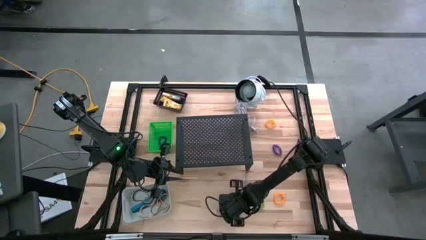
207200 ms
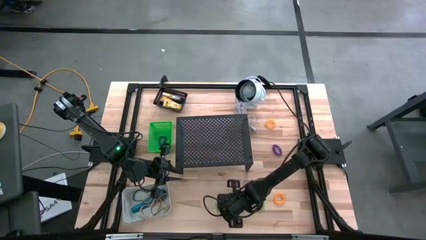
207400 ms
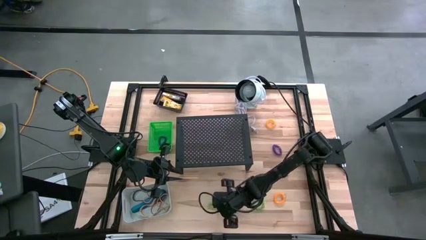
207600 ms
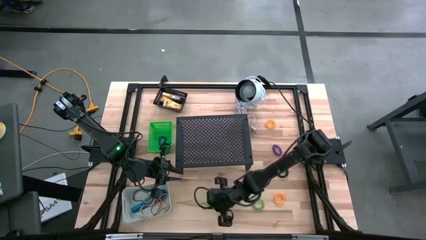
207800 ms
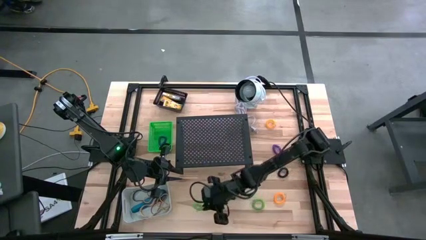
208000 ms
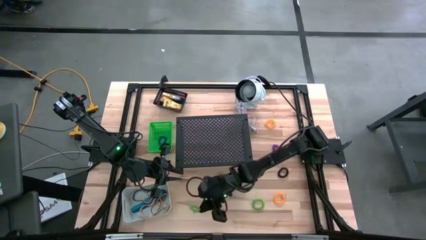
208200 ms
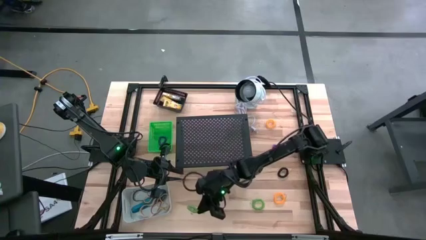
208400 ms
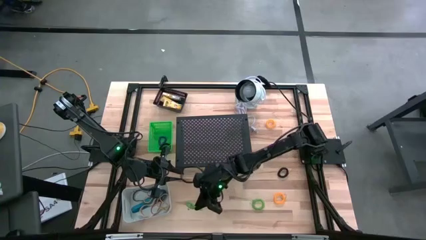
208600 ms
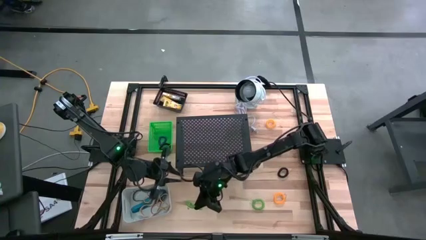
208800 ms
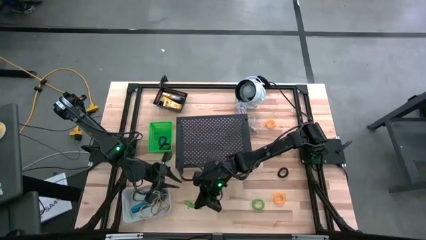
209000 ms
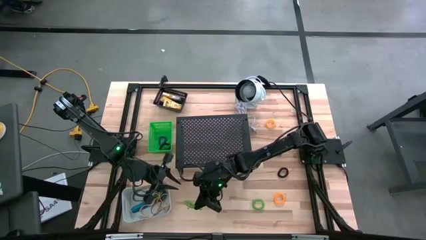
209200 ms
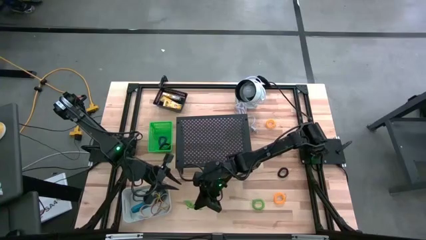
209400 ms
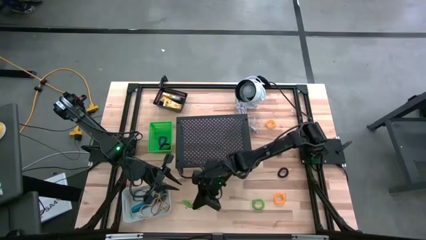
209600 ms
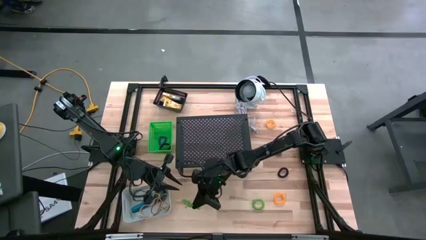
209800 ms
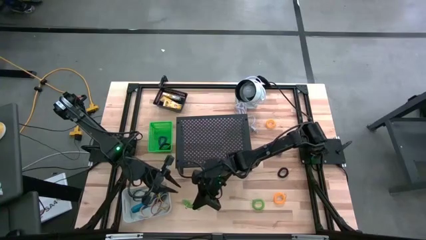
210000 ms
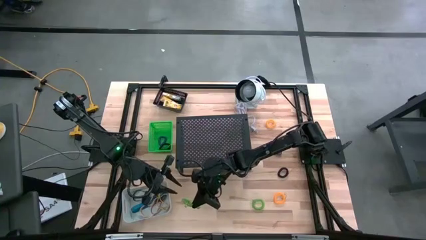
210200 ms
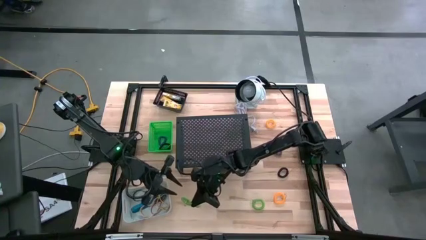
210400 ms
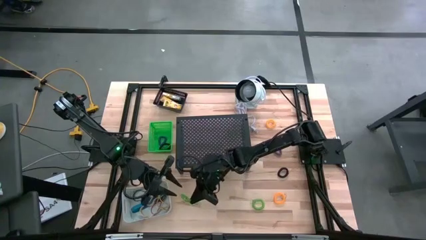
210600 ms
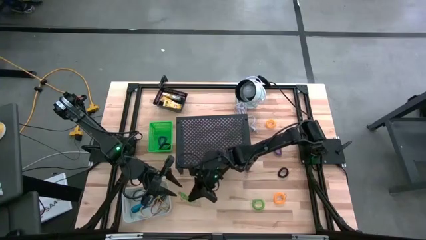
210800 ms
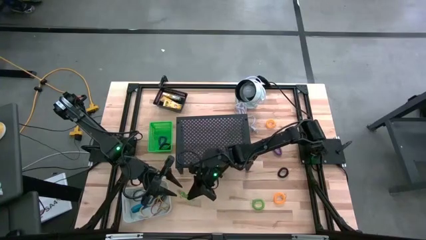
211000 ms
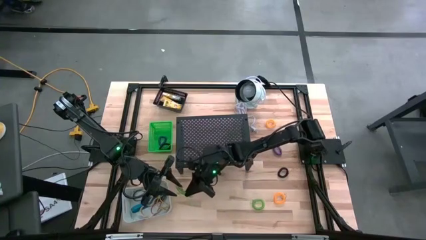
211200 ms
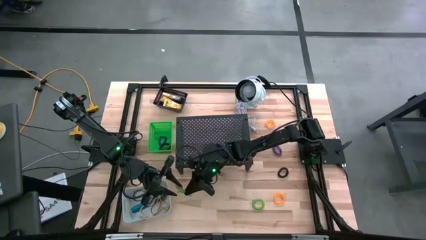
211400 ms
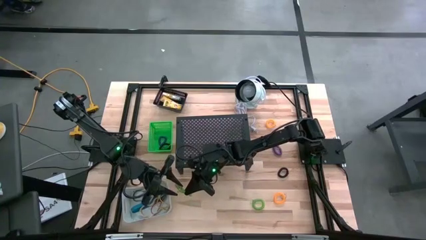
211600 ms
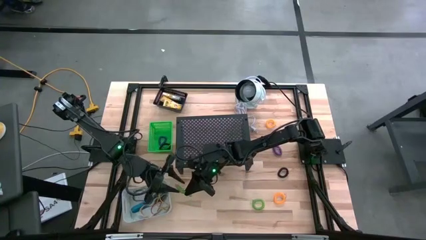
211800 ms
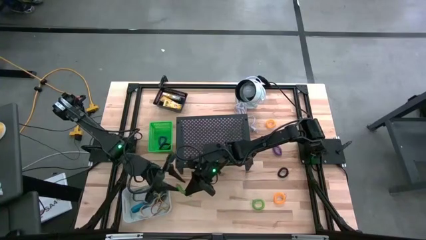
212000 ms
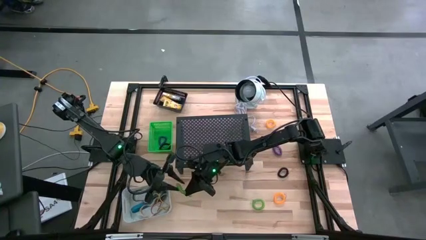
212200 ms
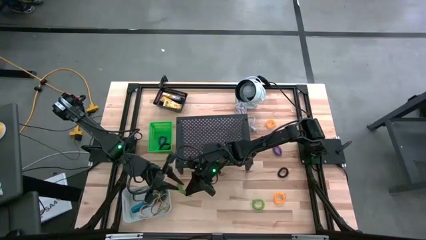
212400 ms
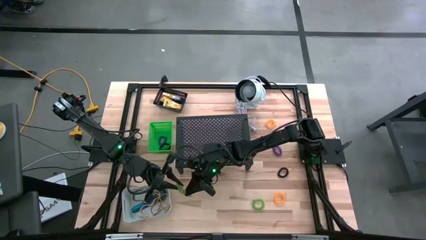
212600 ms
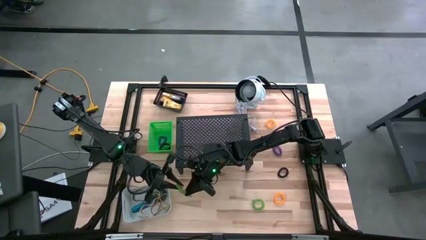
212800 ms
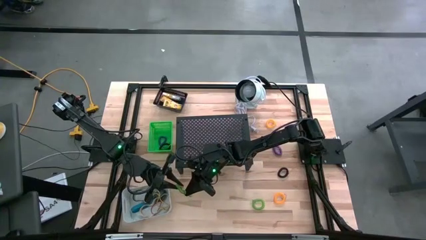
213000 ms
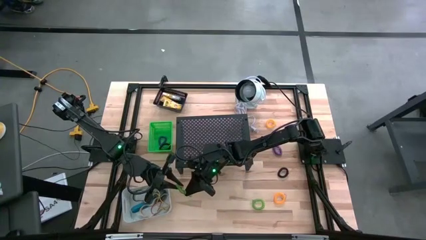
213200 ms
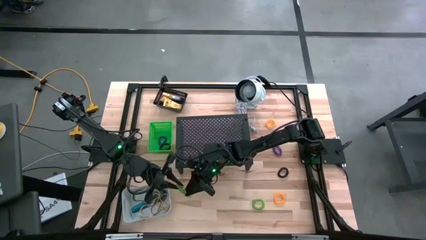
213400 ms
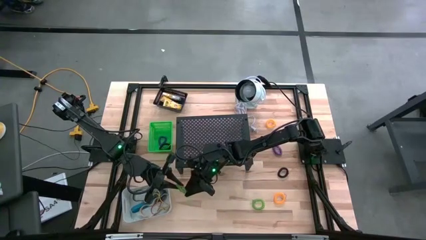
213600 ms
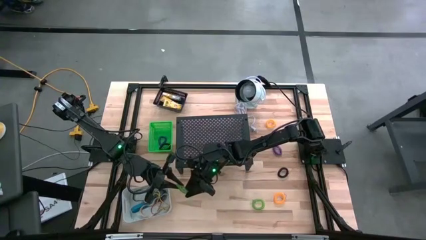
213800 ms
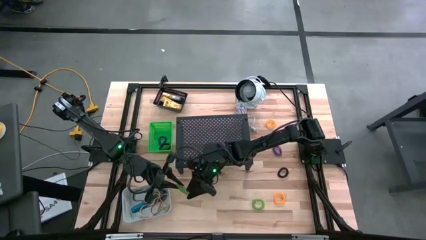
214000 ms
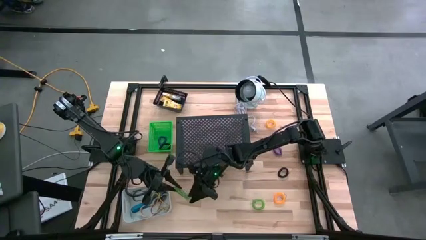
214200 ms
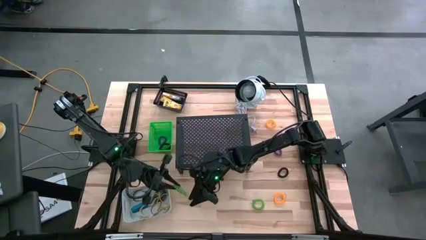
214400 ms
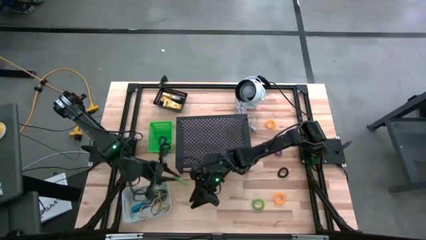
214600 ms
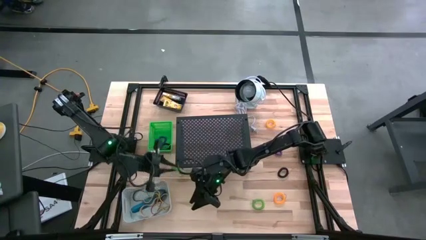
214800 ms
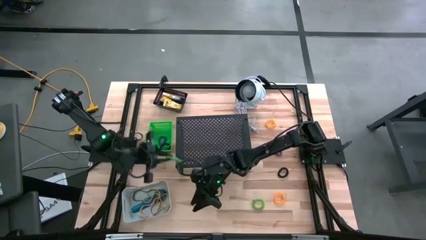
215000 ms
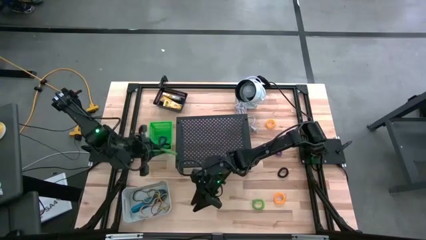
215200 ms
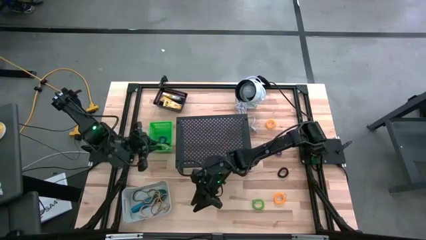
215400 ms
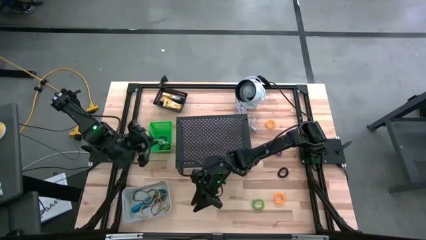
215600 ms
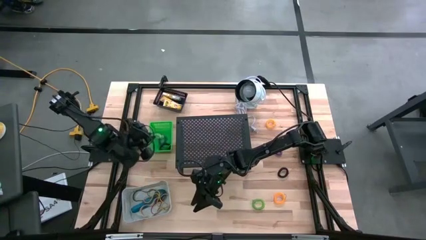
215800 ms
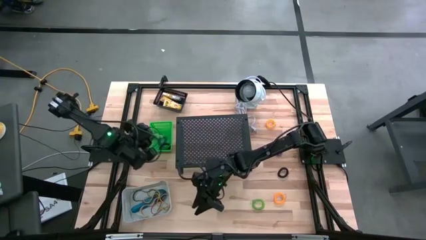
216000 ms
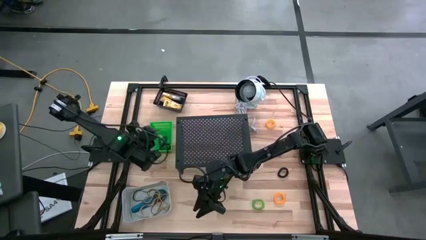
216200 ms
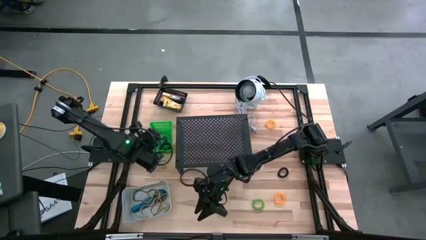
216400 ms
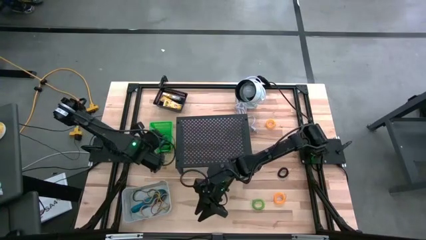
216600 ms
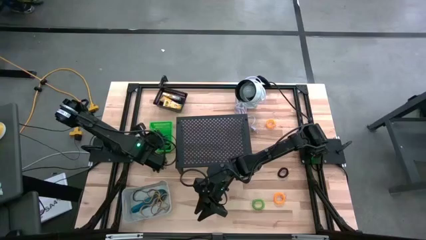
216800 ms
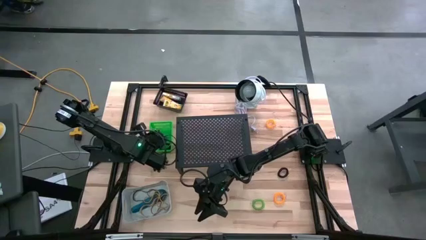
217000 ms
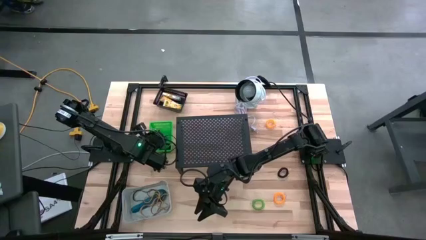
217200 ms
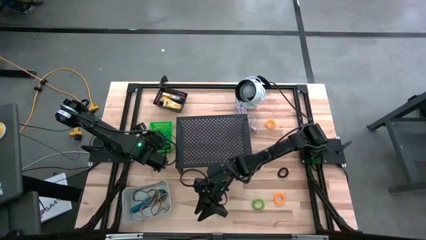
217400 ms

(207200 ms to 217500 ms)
Task: Pick & Place Office Desk Supplies
Put the left green spring keychain into the green bin

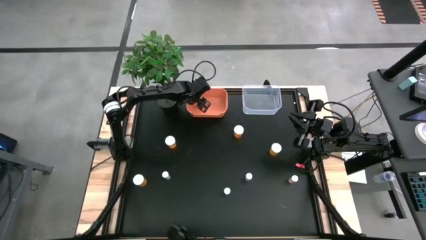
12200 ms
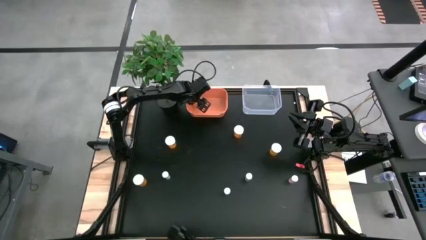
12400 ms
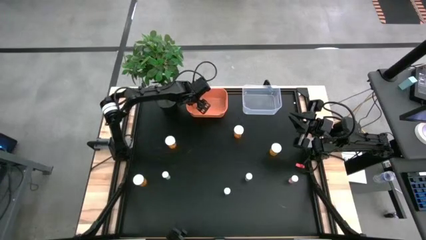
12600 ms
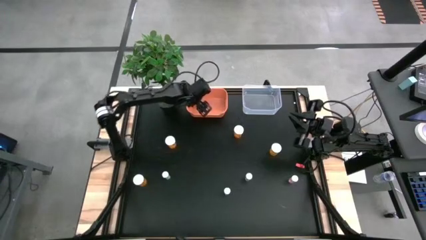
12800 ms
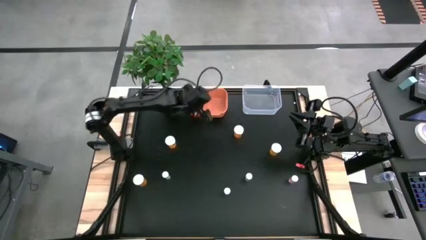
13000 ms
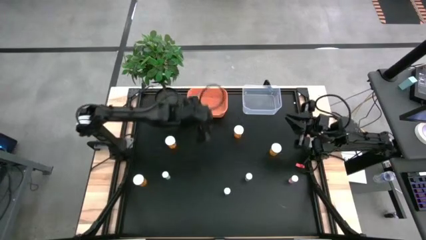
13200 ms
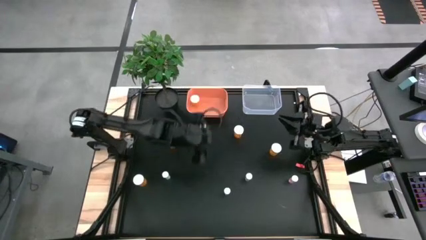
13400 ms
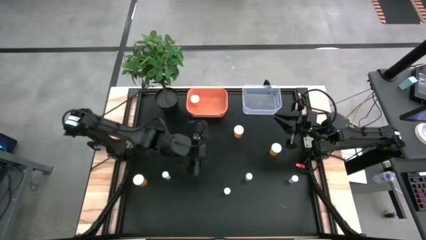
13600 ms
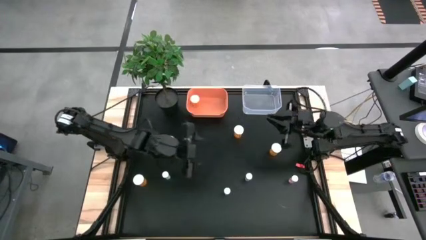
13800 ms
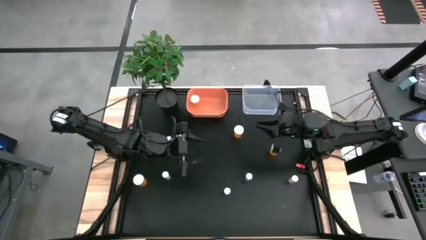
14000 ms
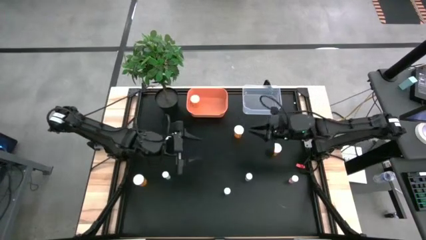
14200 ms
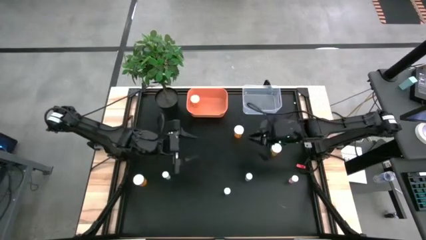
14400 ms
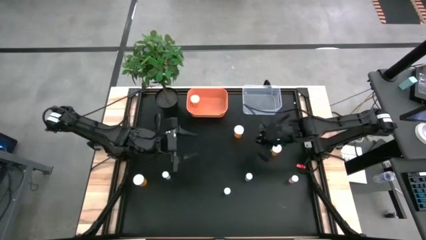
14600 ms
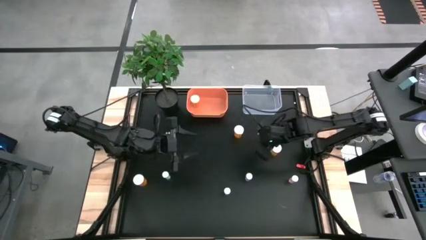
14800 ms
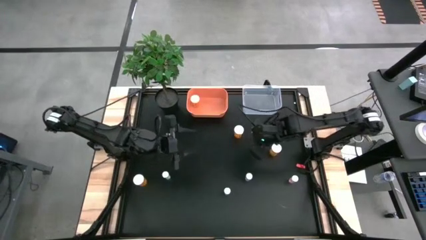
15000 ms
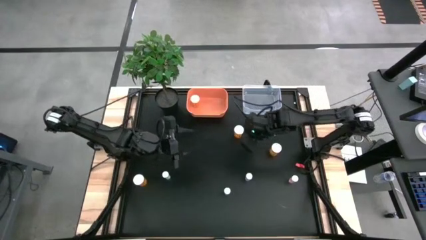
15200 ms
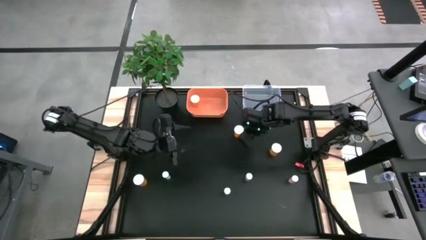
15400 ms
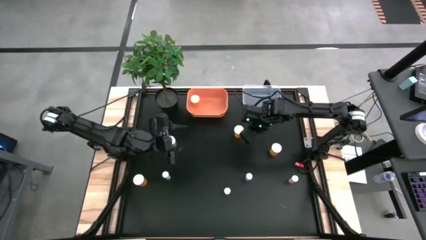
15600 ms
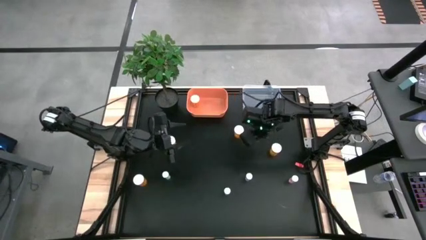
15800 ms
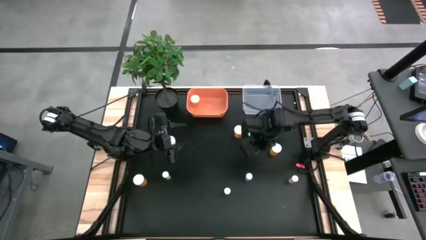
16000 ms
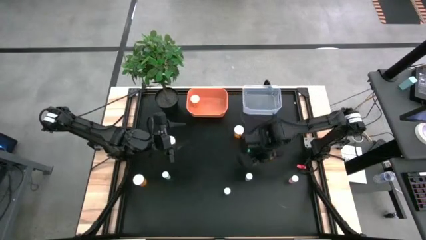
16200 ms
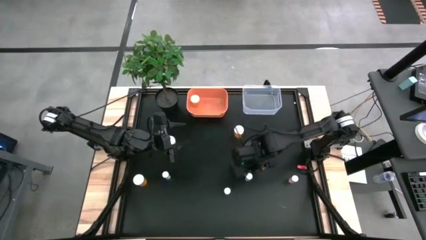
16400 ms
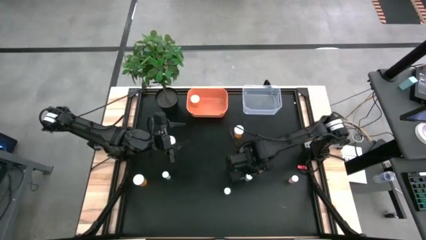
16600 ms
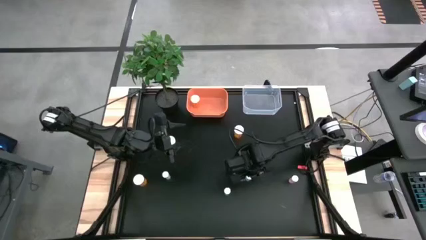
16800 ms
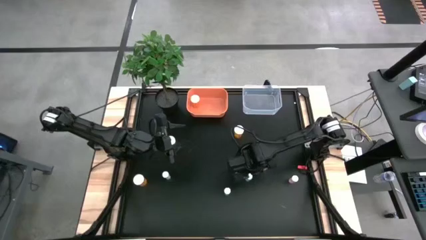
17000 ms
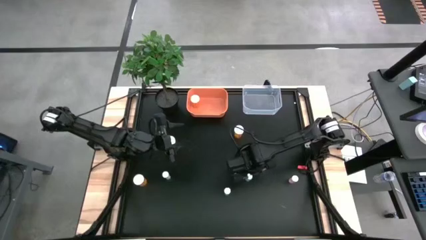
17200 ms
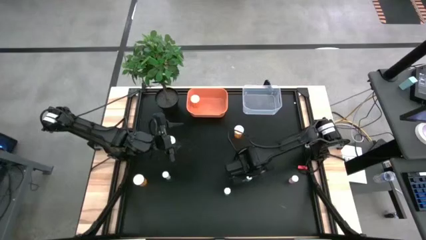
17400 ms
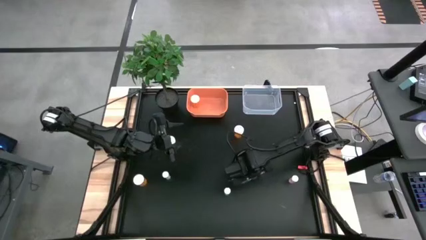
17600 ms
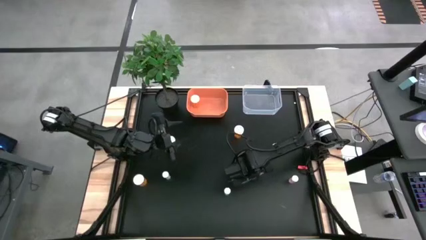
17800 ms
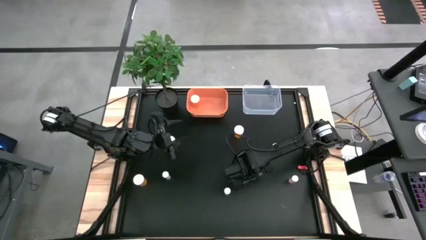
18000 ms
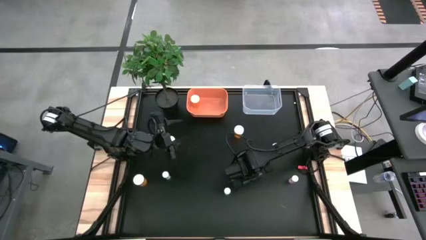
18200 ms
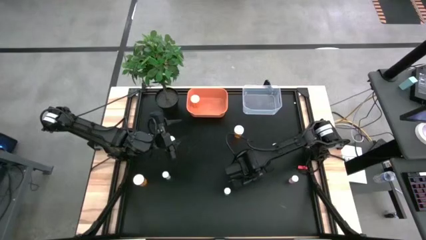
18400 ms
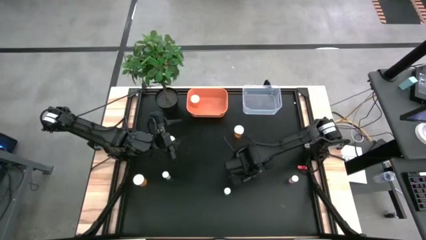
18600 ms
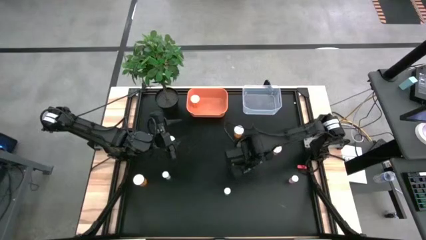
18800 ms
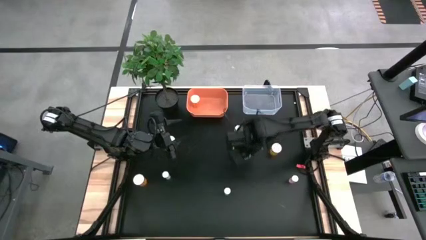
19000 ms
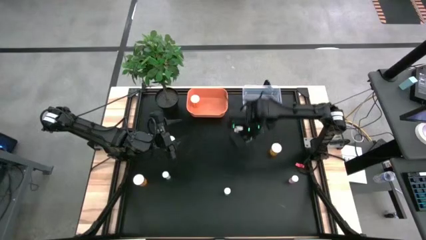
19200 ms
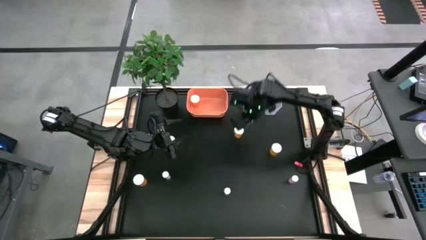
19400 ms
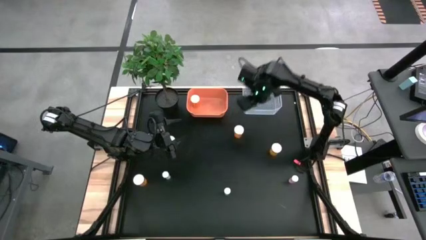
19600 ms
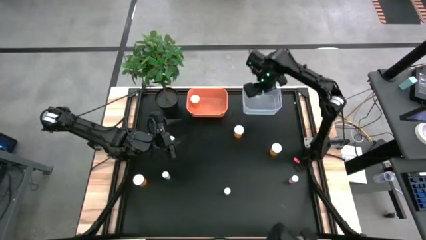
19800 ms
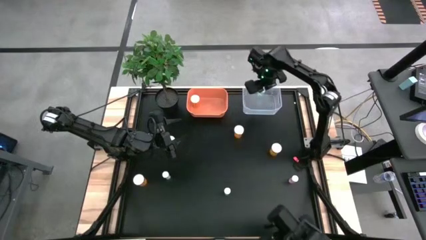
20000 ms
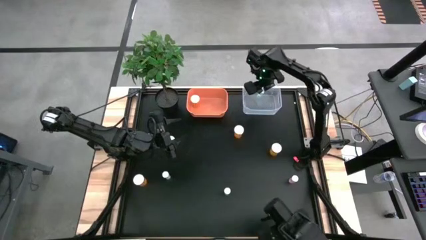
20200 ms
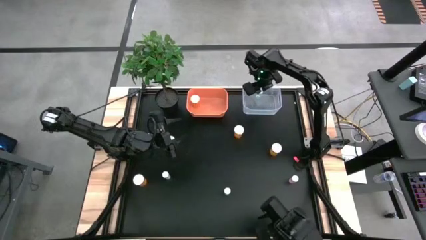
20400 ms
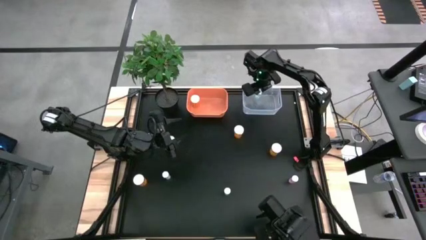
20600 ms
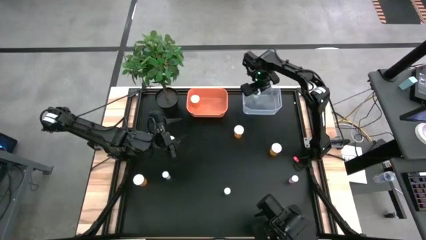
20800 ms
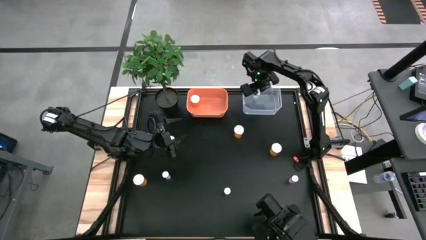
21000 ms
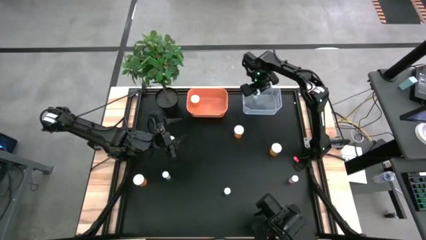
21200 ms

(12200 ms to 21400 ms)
Task: Pick and place medicine bottles into bin by pill shape (circle, oval)
Put the blue pill bottle into the transparent bin
